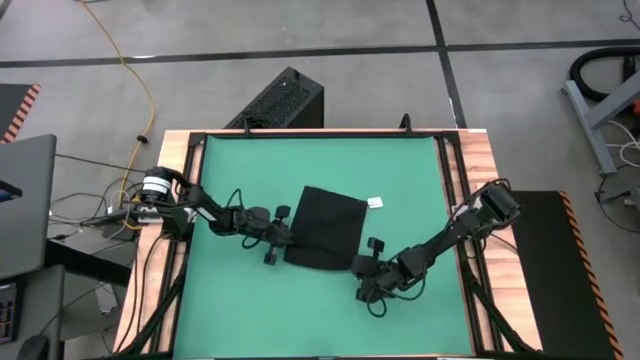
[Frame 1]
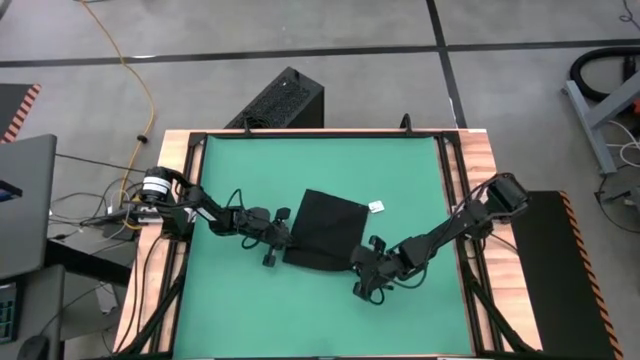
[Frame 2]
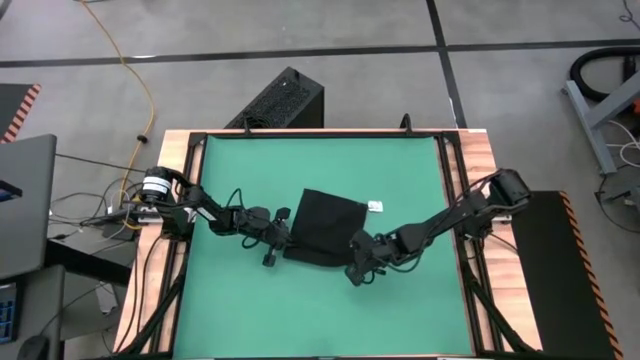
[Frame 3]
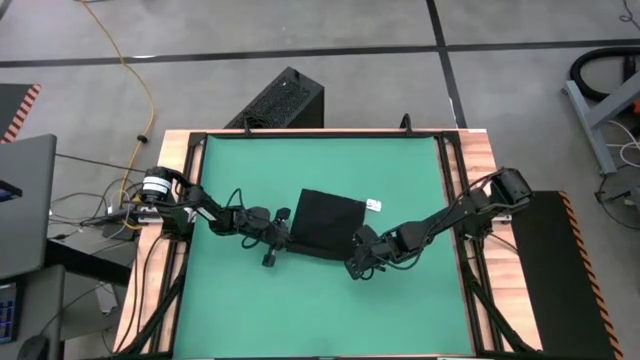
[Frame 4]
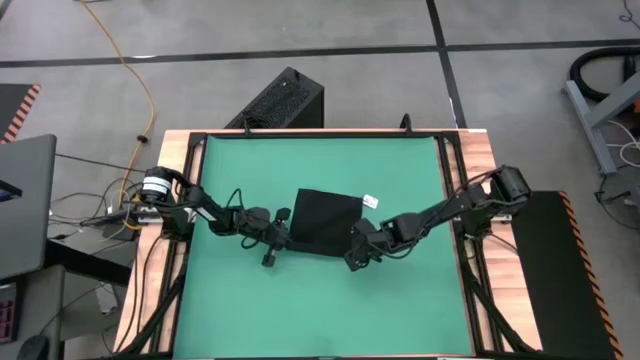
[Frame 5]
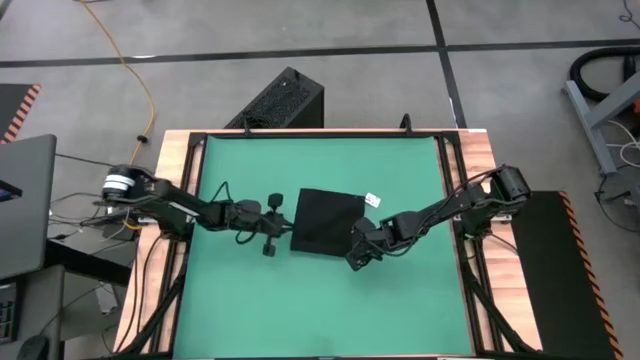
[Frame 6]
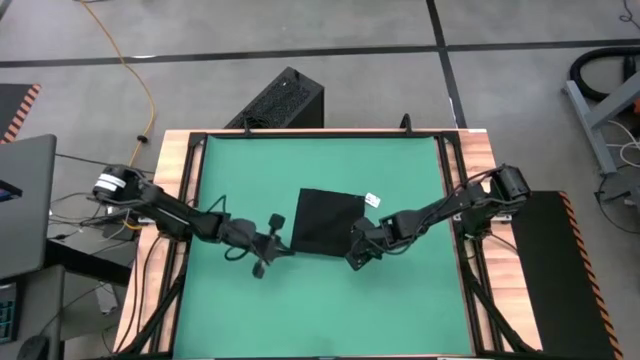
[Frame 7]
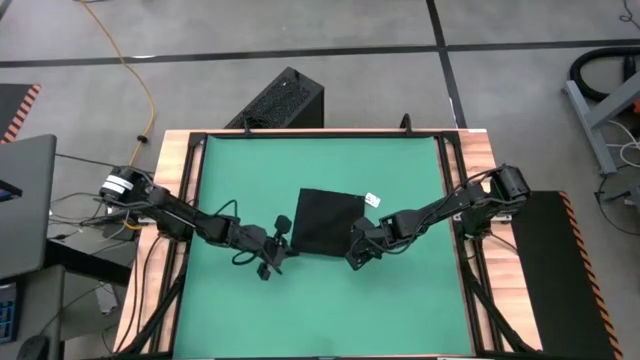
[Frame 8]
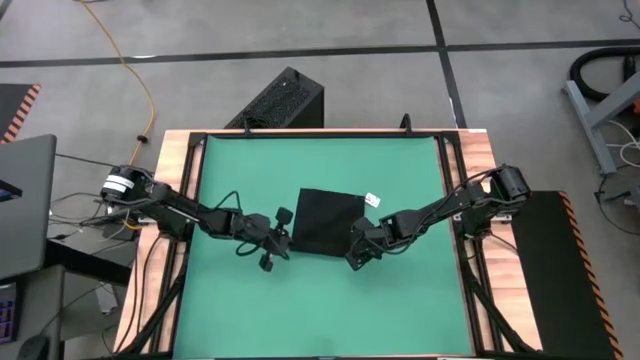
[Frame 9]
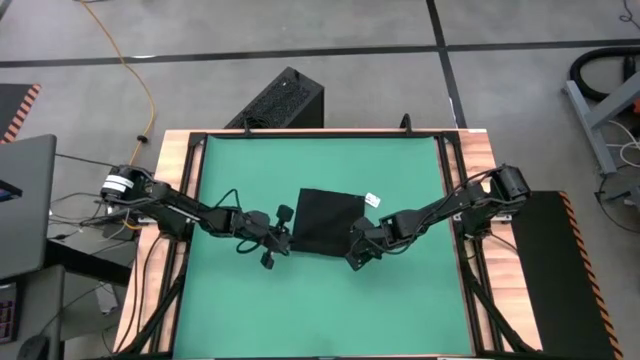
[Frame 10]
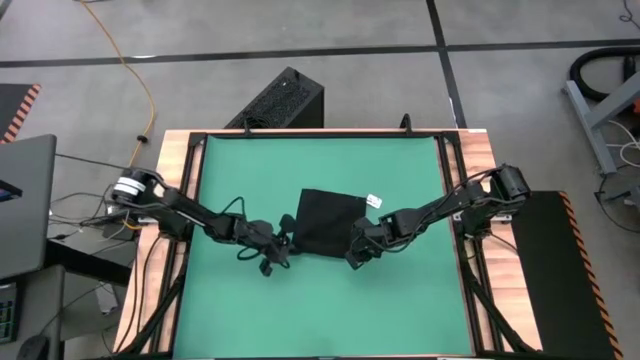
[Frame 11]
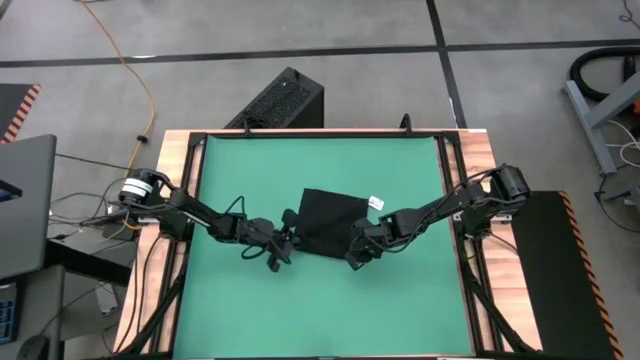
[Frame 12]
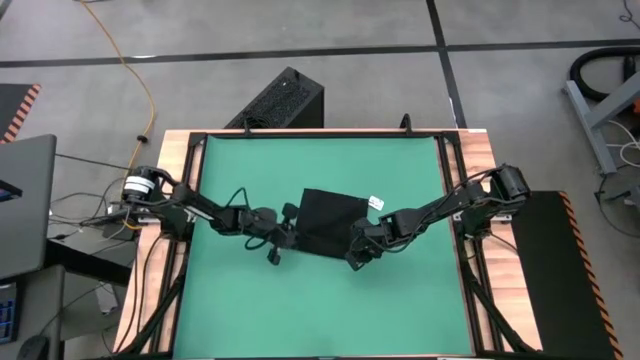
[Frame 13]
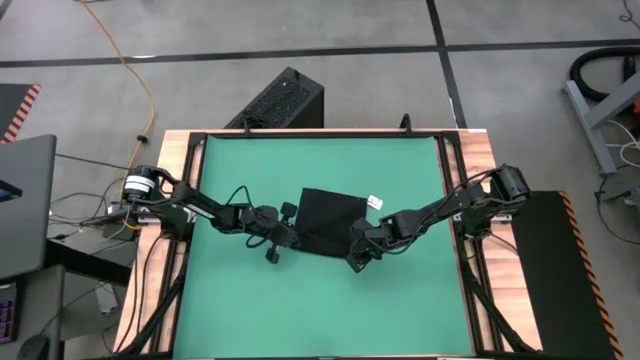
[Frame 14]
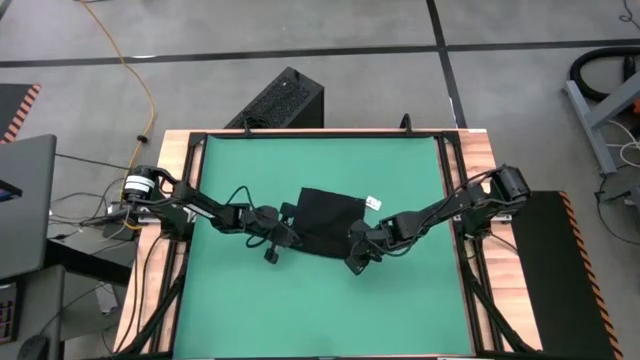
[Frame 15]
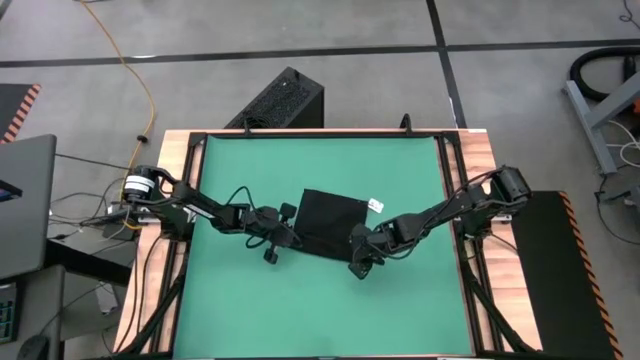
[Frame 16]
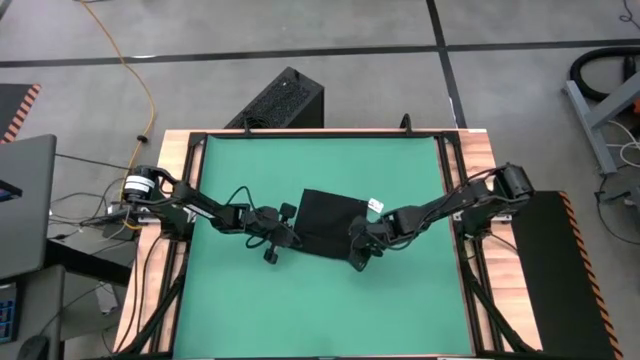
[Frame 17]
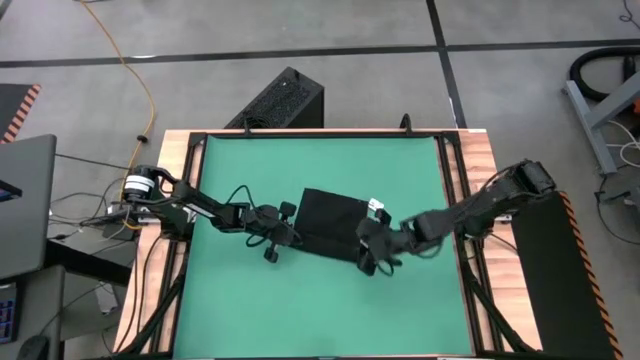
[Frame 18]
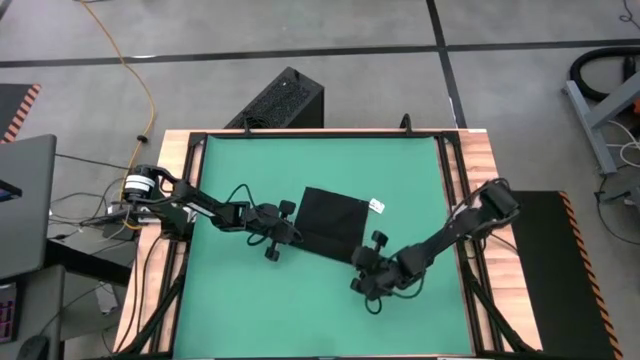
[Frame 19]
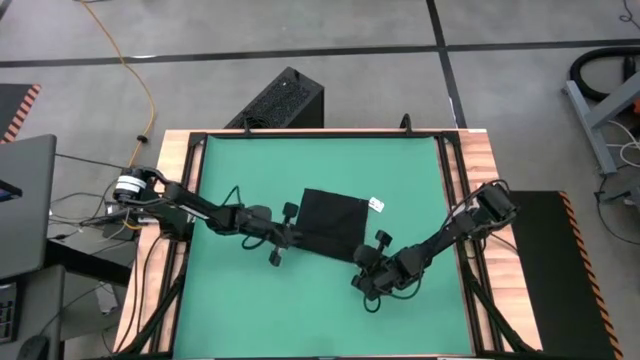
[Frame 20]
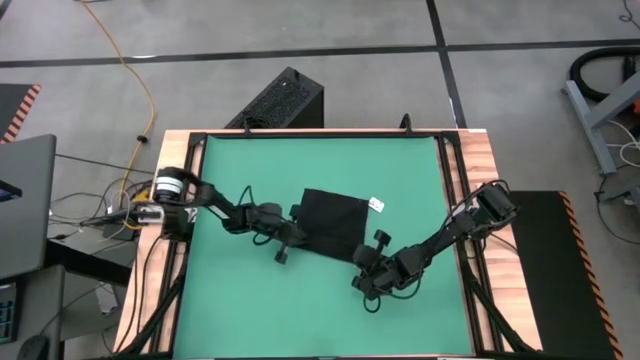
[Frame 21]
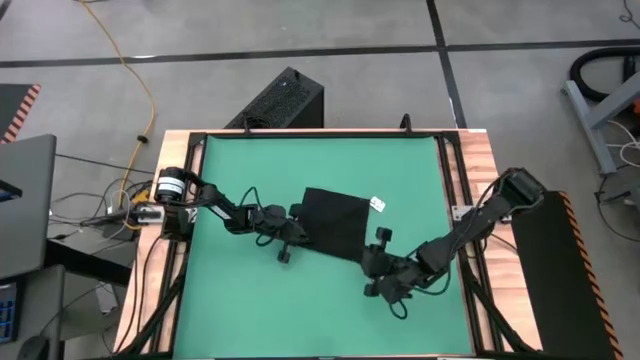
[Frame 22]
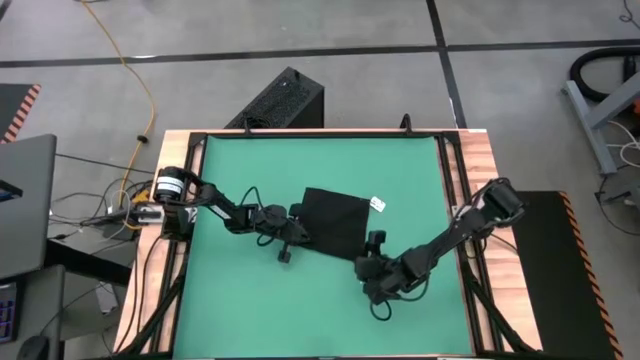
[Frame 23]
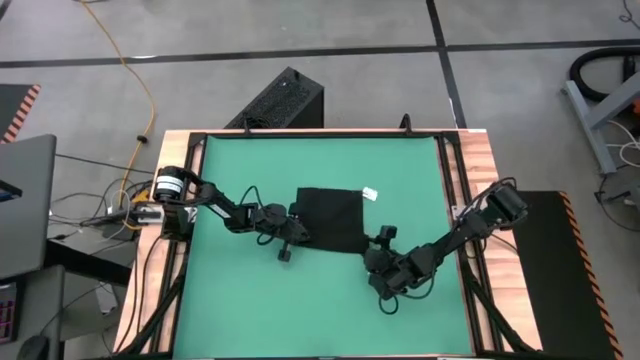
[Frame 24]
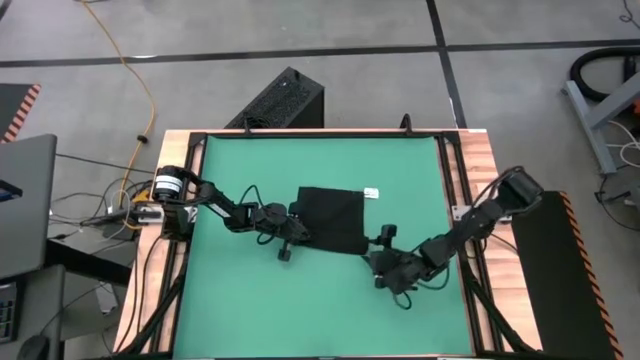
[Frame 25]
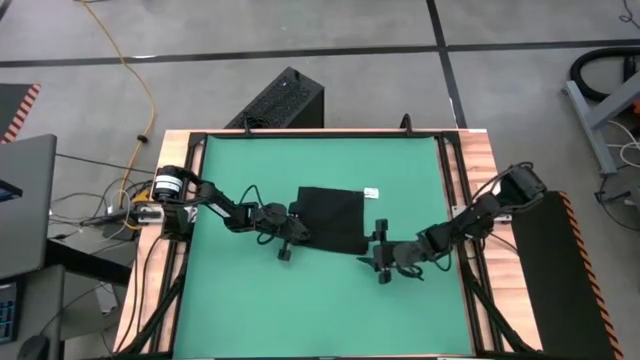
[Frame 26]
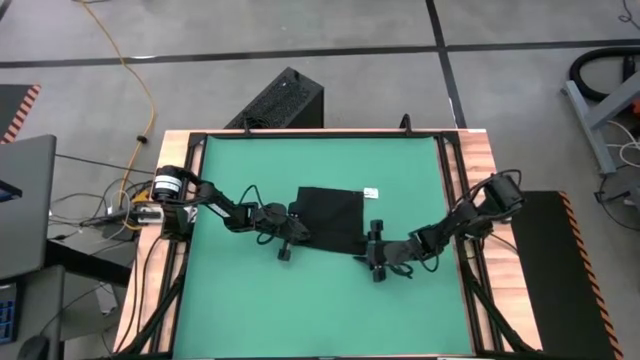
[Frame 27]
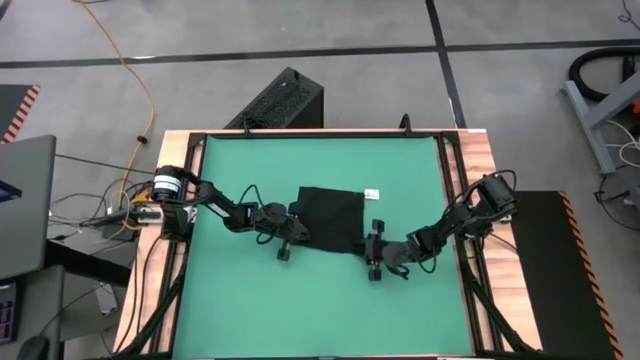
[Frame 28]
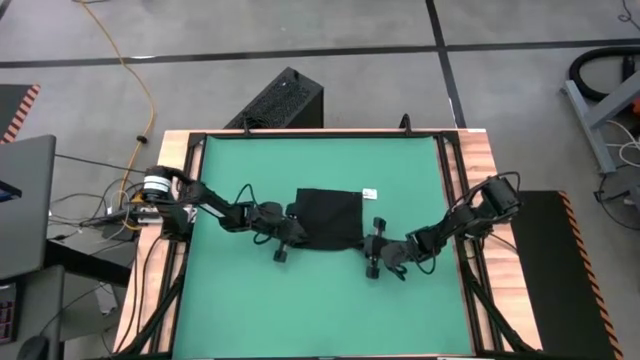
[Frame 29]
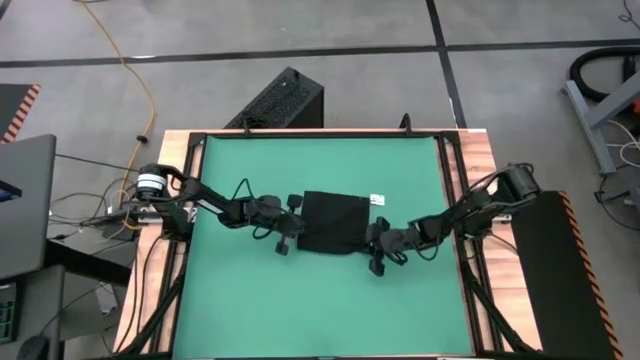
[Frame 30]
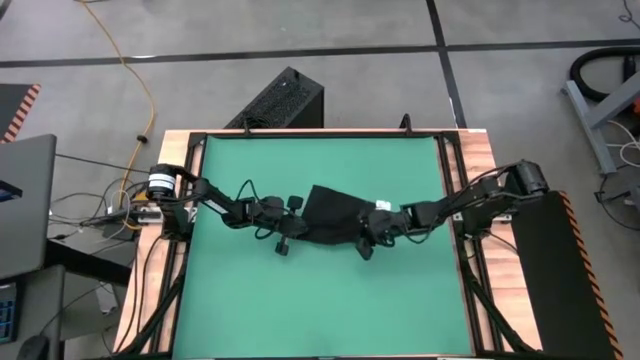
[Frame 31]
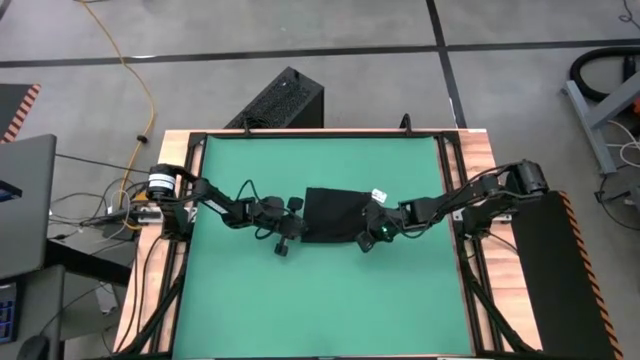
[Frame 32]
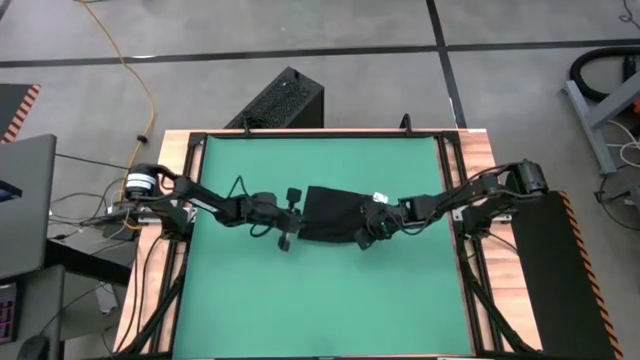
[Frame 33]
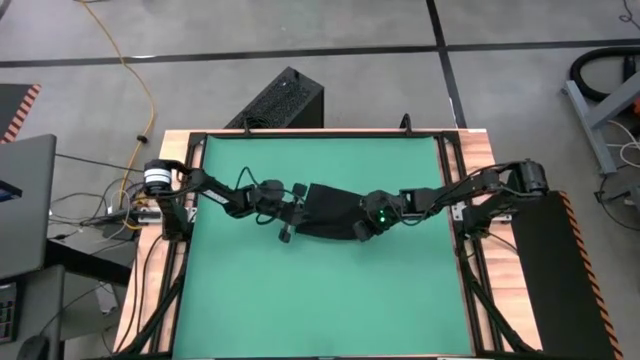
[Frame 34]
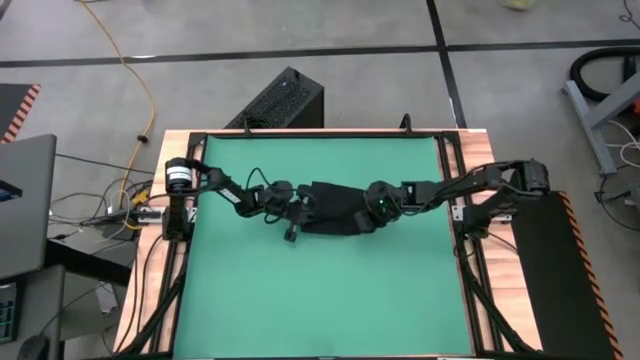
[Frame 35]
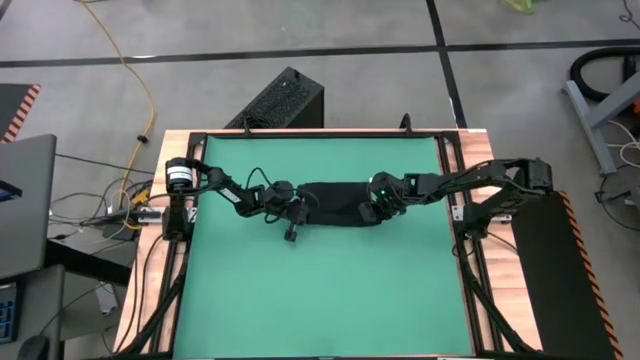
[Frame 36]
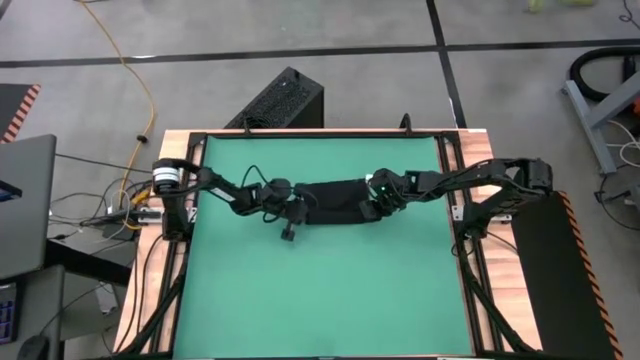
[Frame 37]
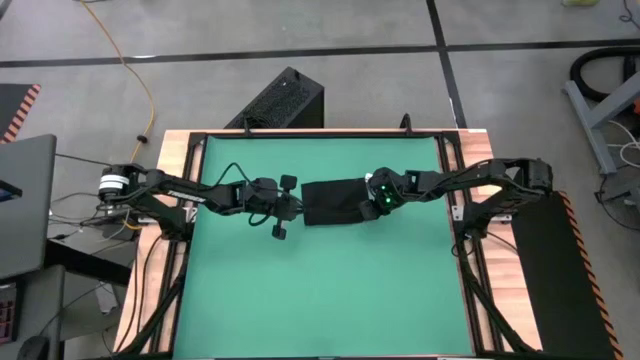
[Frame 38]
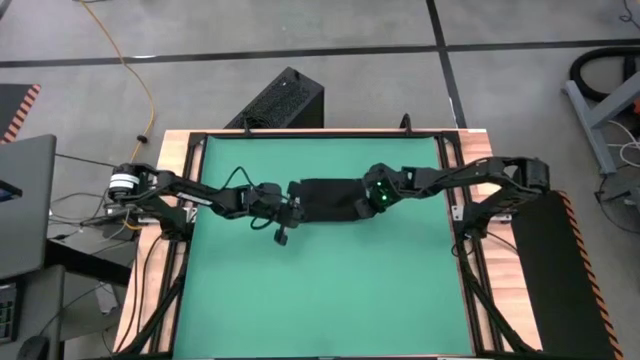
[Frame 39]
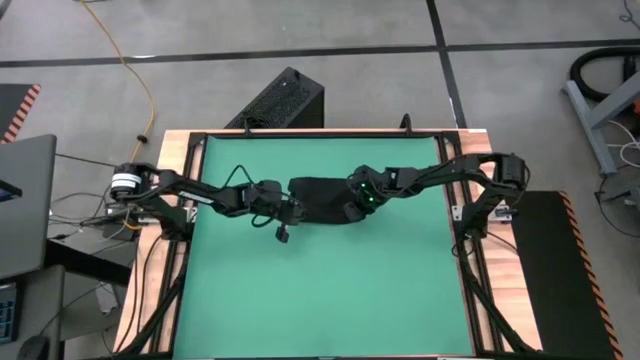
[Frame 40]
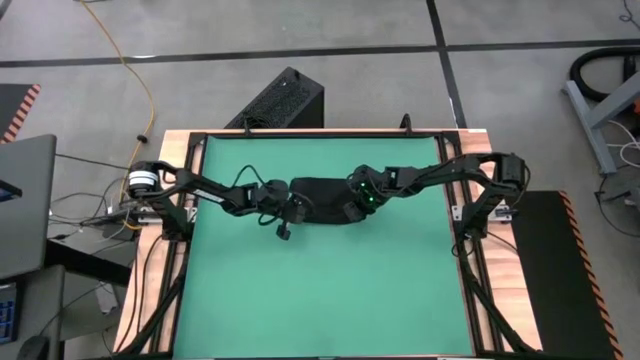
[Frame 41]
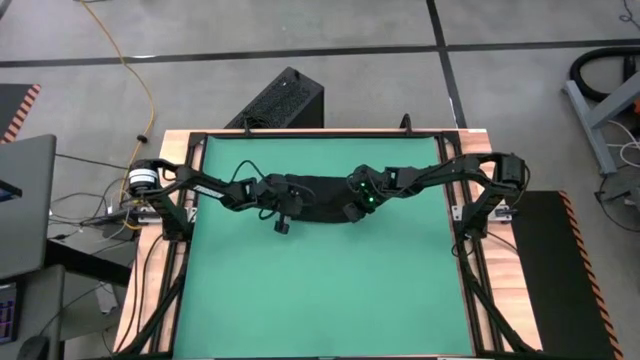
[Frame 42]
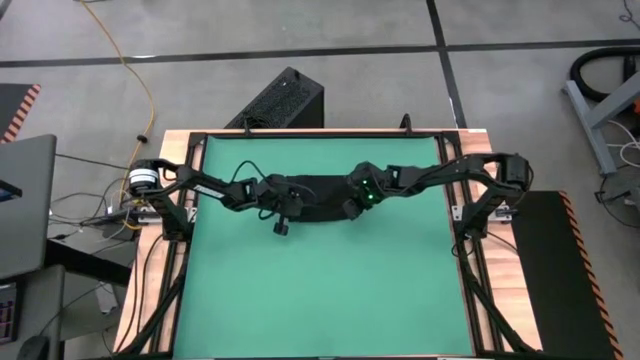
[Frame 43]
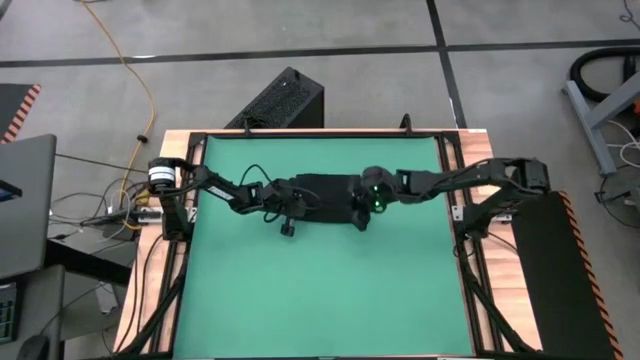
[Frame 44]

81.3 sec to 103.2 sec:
Task: Roll towel
Roll the black towel
